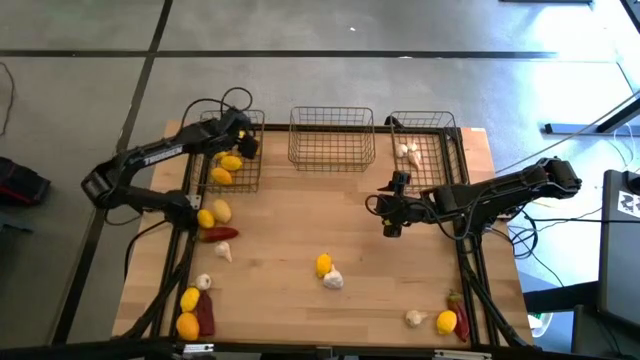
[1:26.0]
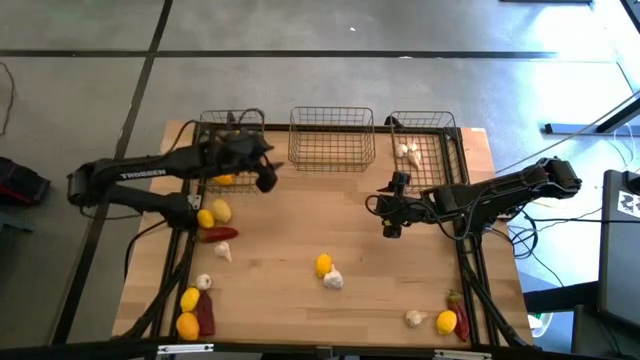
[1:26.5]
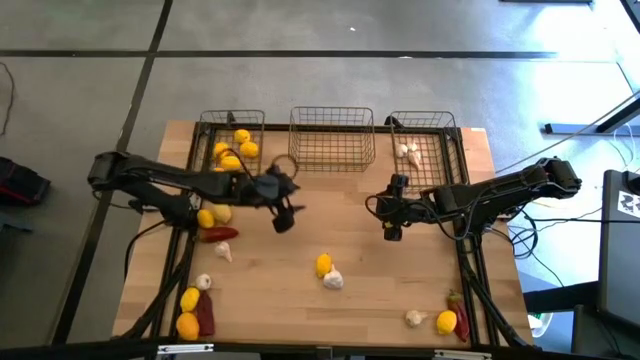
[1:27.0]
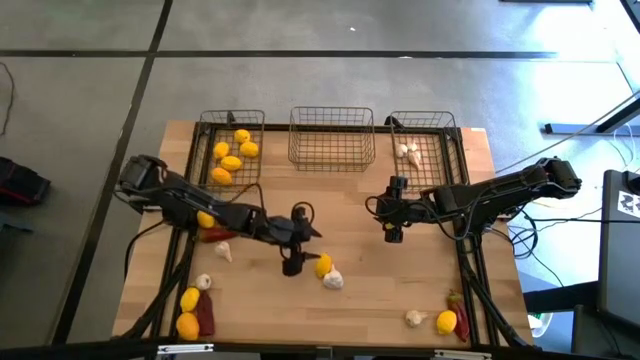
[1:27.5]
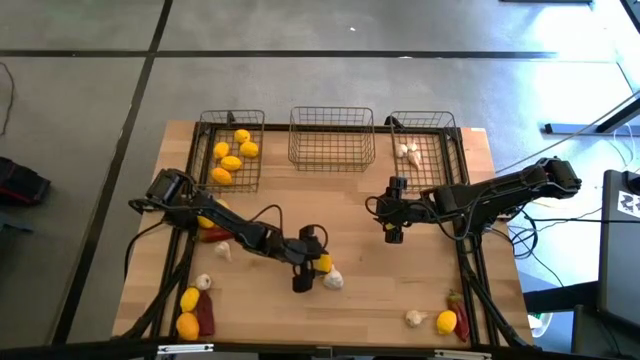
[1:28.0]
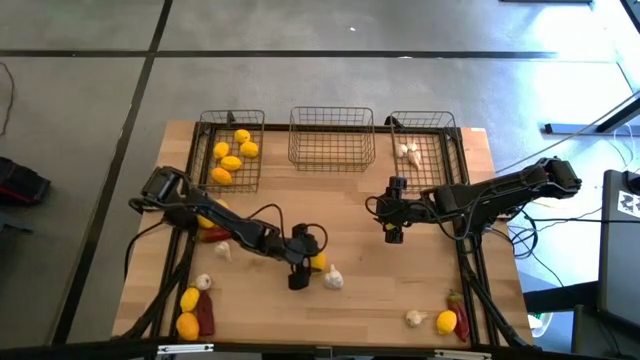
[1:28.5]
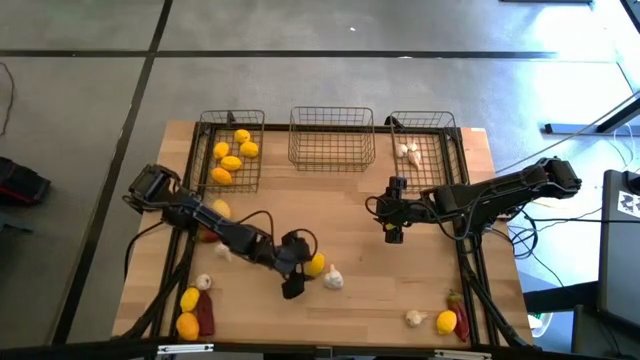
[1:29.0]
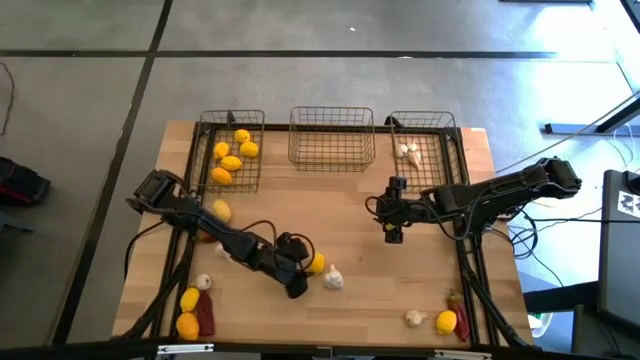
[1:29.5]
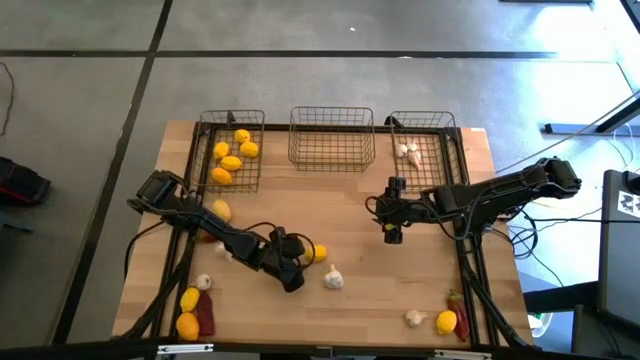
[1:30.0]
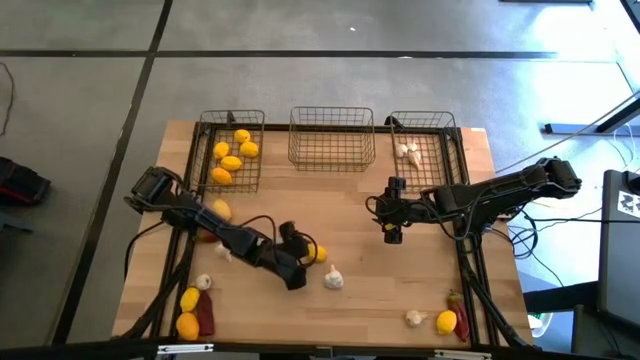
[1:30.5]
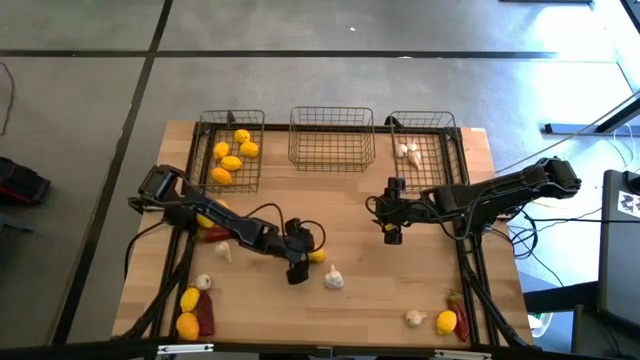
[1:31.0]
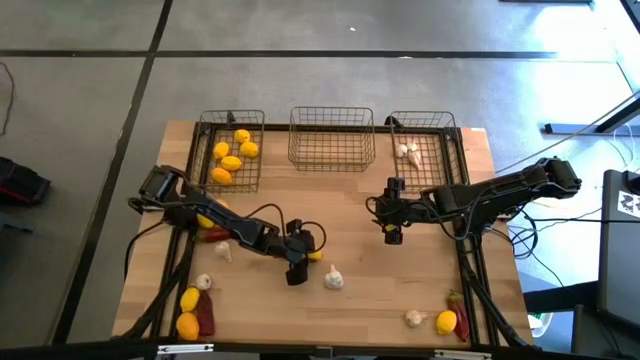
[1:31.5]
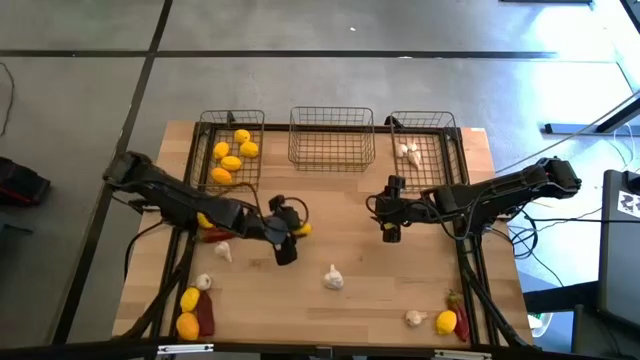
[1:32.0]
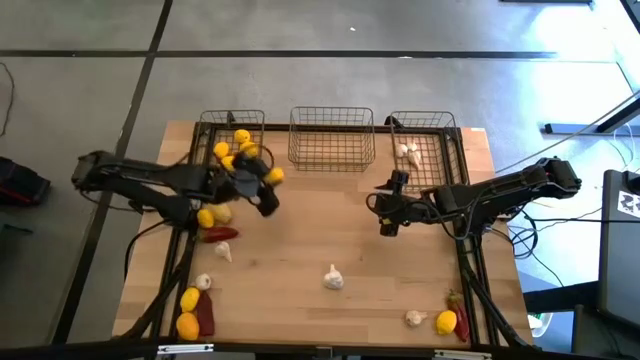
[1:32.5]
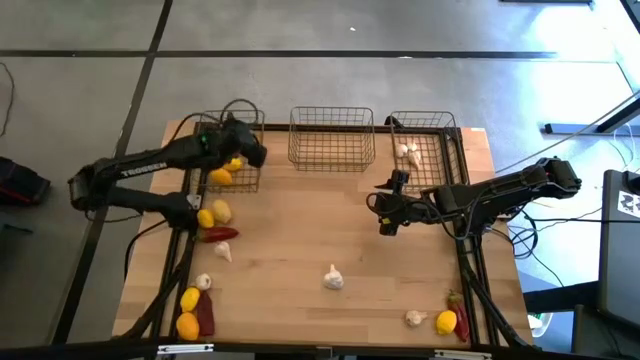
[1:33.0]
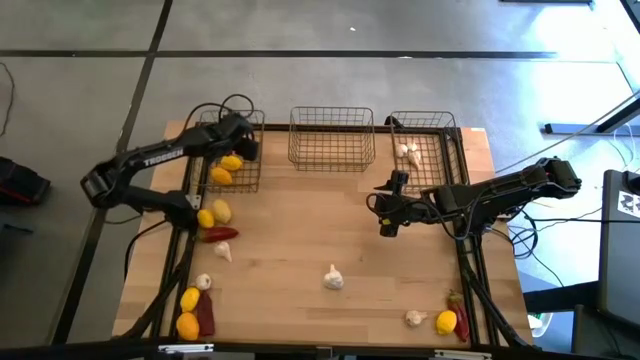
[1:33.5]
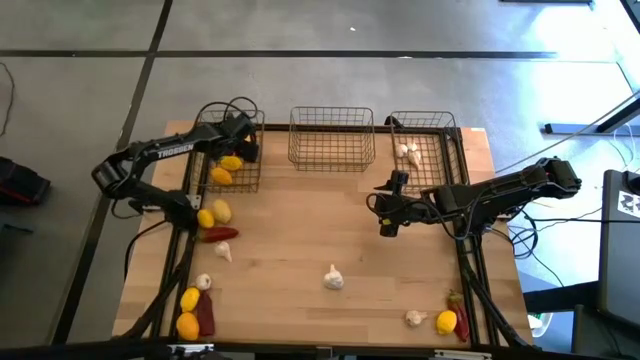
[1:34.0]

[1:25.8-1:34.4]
Task: Sort produce into baskets
Put the yellow lemon into the left gold wire basket

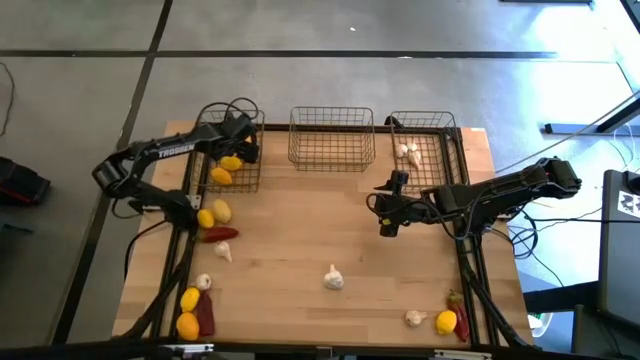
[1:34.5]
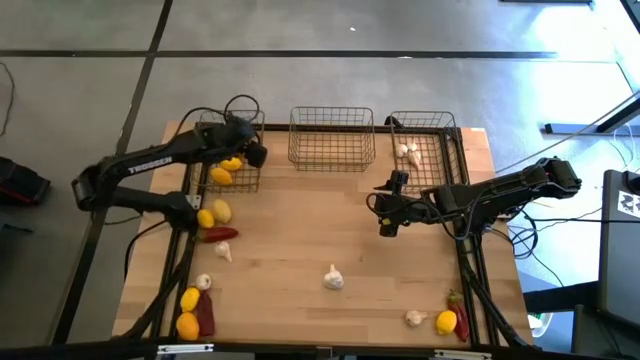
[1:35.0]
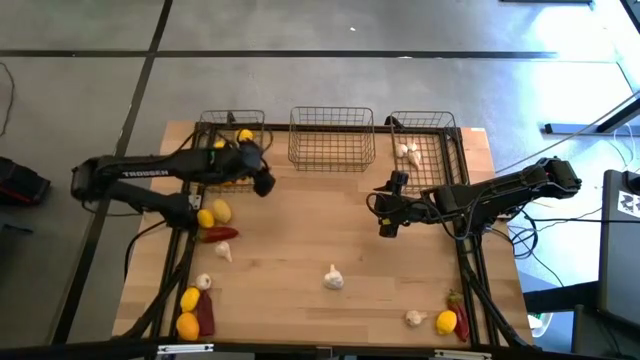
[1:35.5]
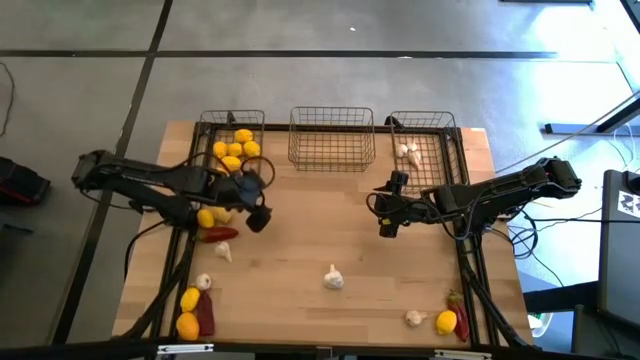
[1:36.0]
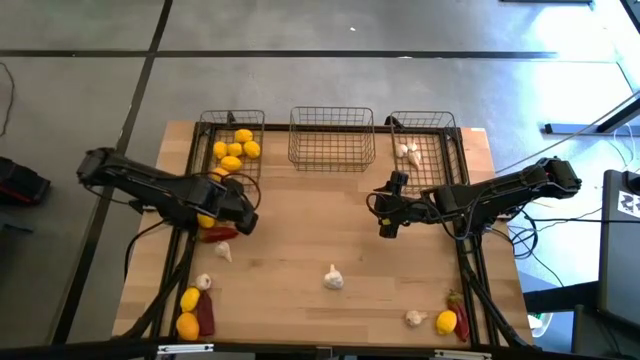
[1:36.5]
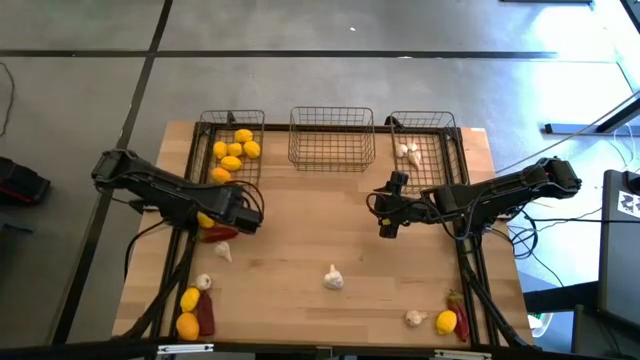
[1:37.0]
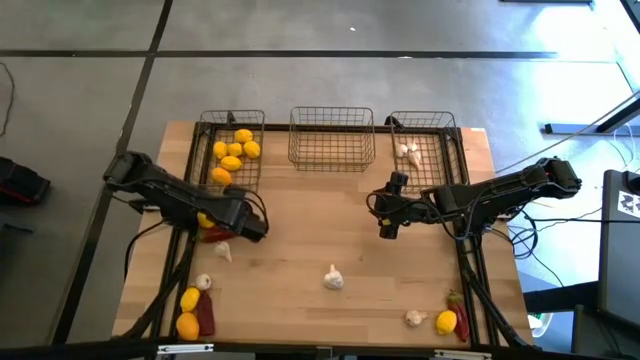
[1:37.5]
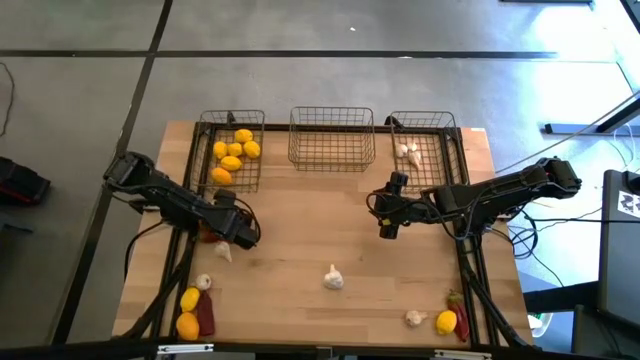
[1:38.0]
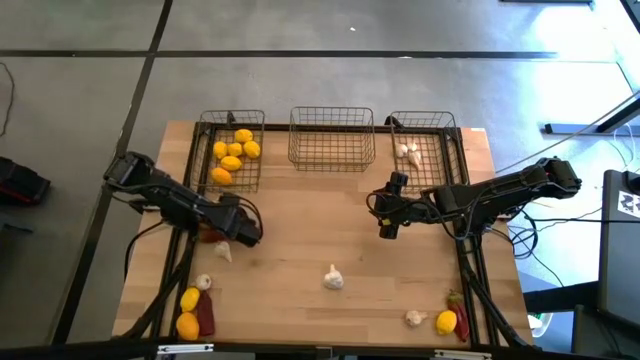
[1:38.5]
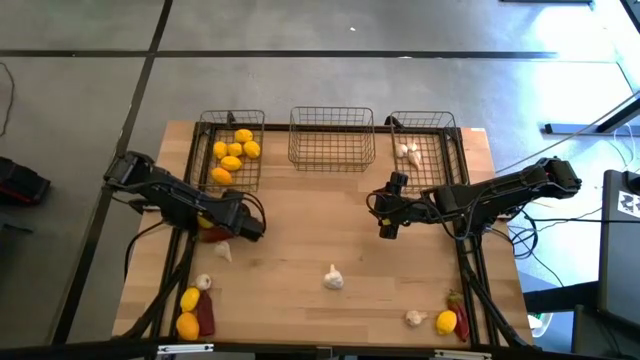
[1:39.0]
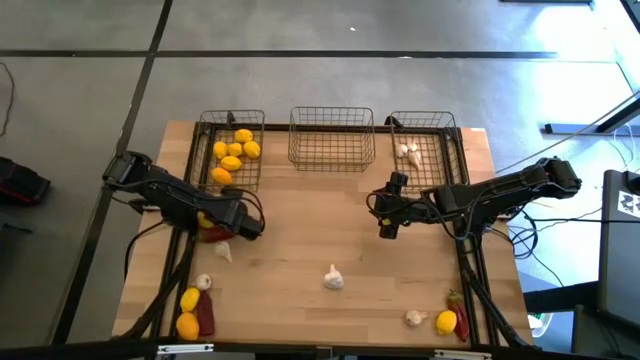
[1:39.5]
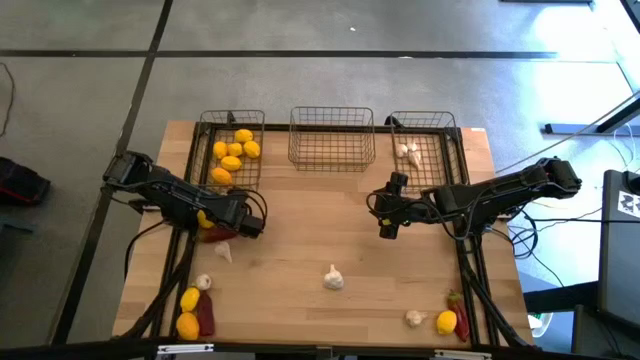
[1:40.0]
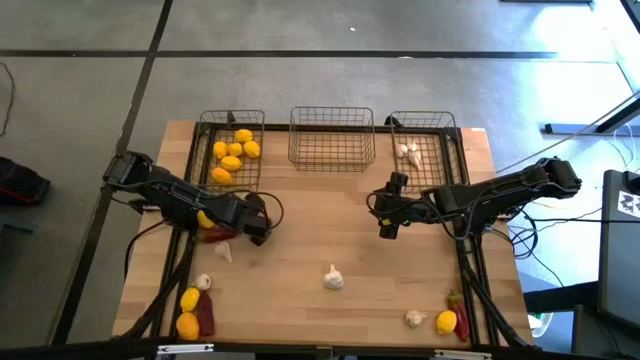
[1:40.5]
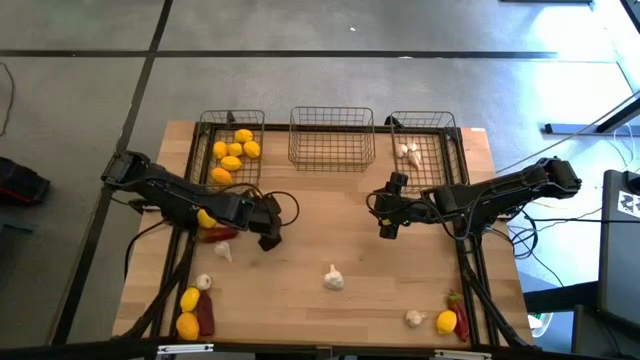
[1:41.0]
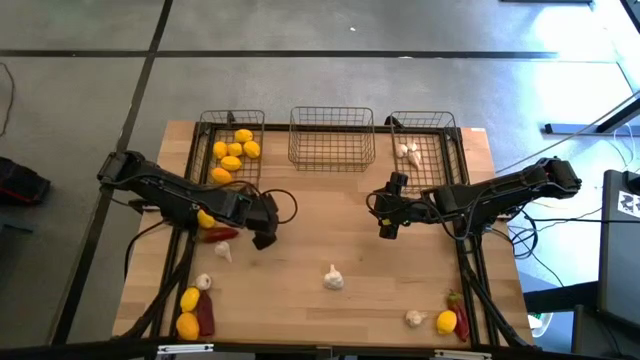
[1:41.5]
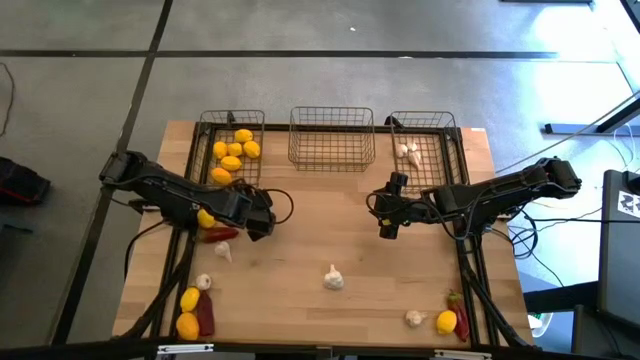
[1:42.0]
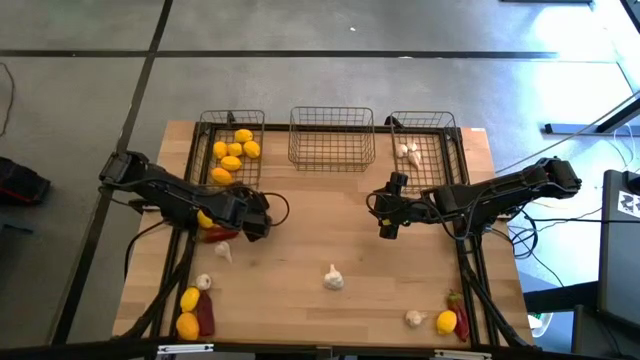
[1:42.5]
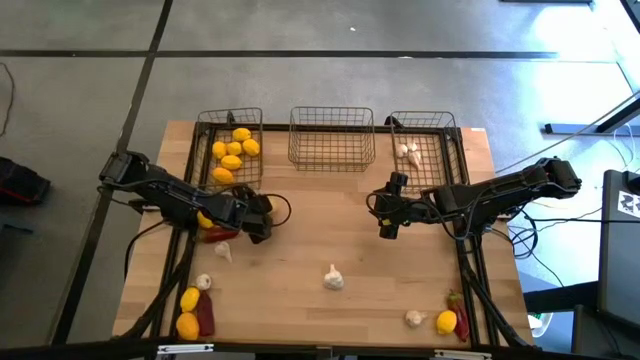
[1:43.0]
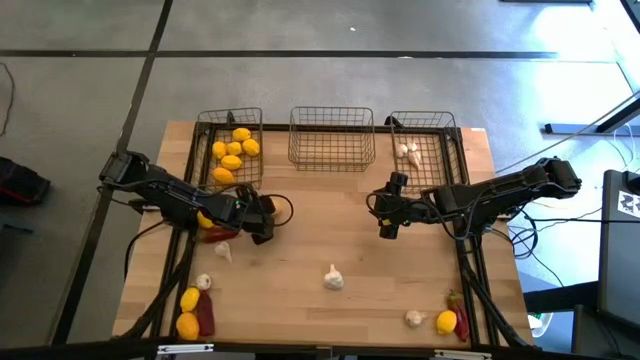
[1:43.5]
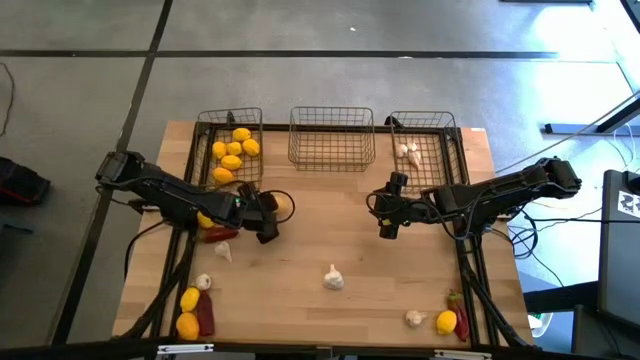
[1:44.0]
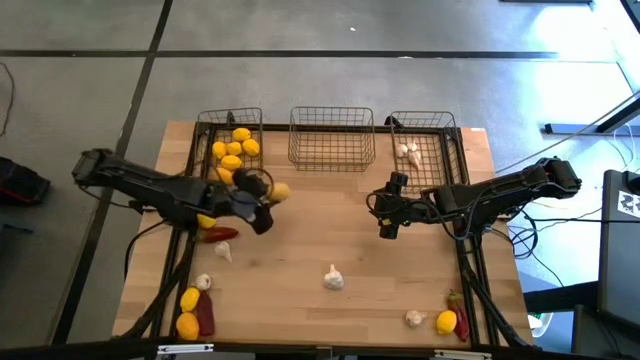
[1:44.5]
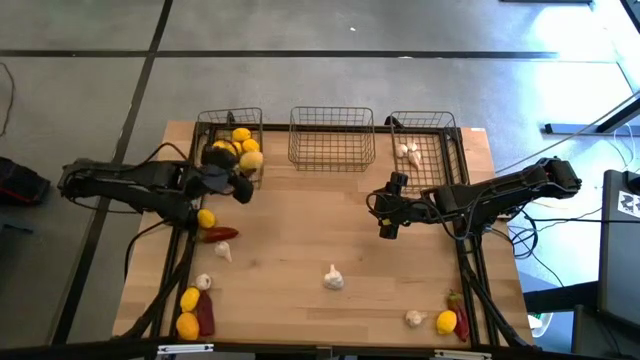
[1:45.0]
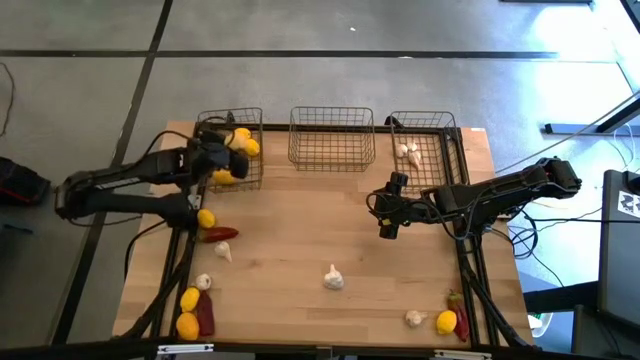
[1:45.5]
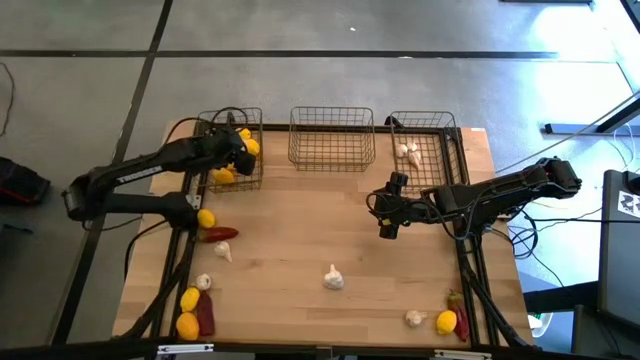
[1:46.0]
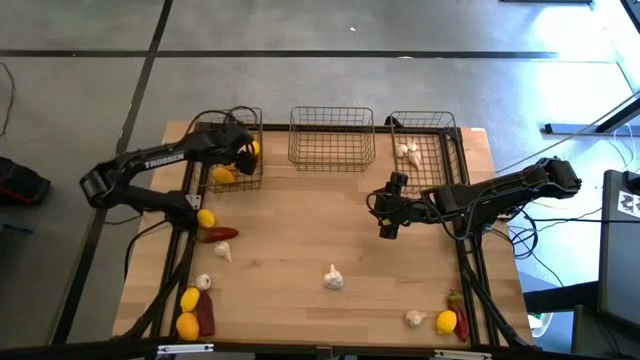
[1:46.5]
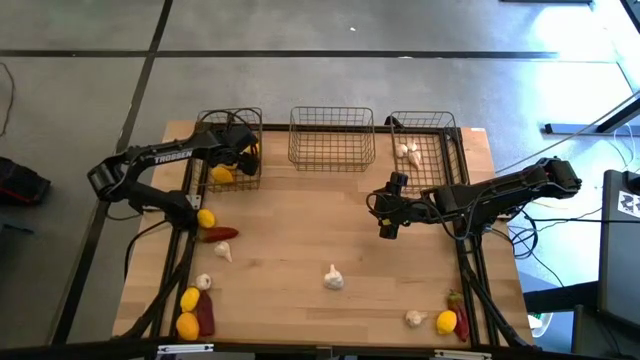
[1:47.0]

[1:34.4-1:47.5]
Put the yellow lemon into the left gold wire basket
